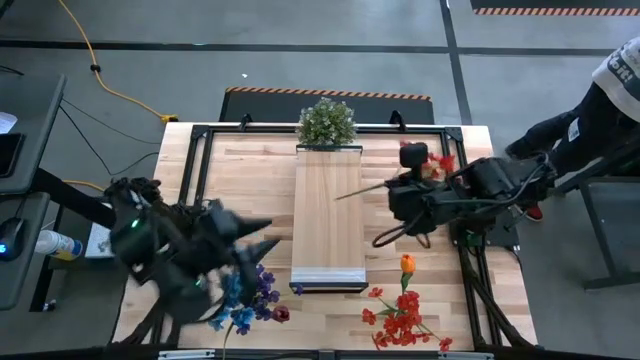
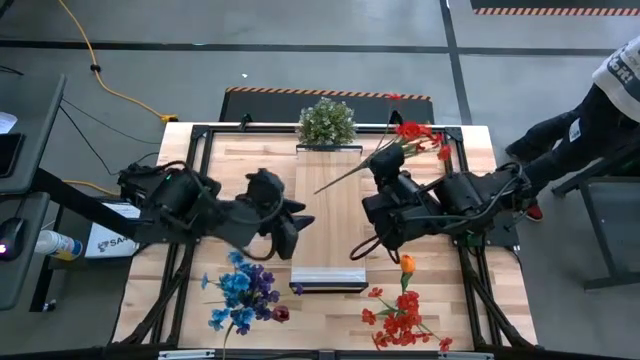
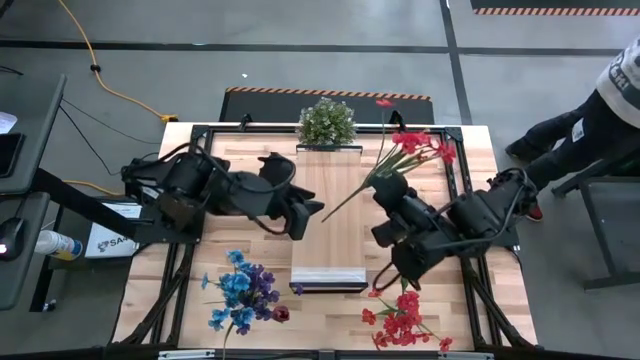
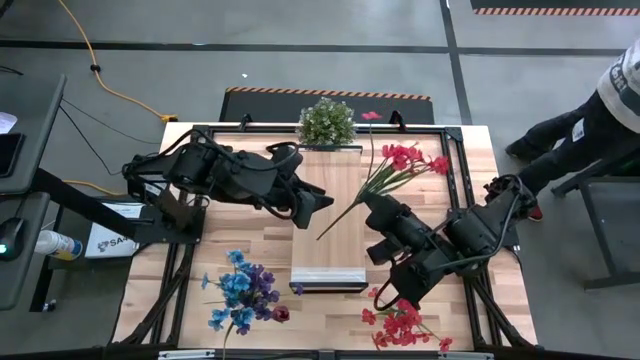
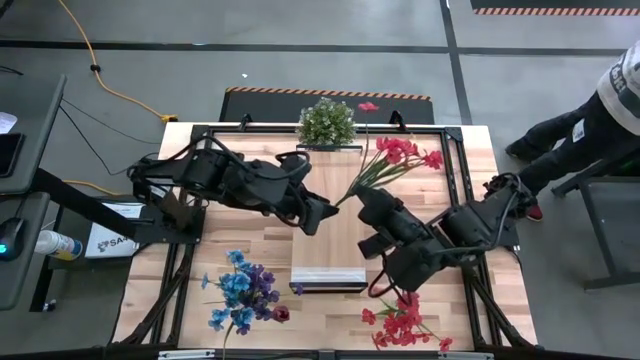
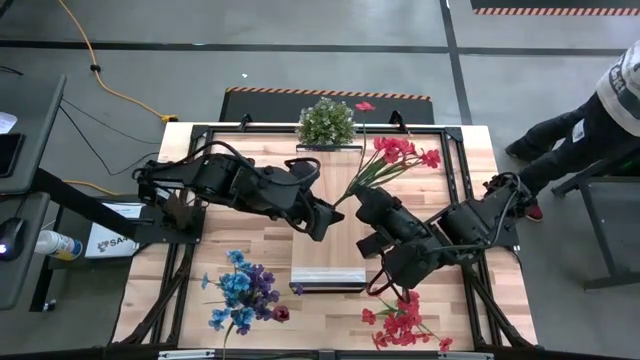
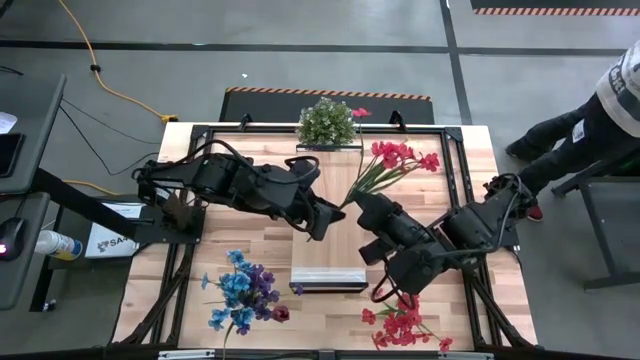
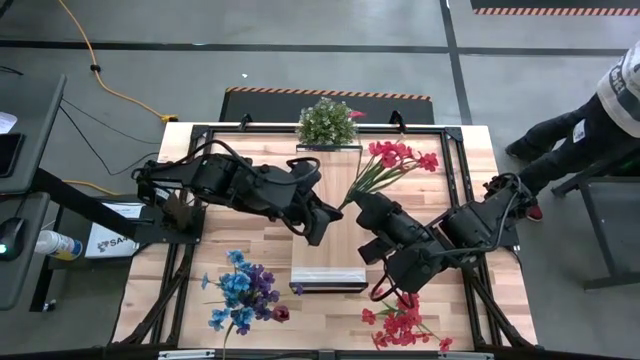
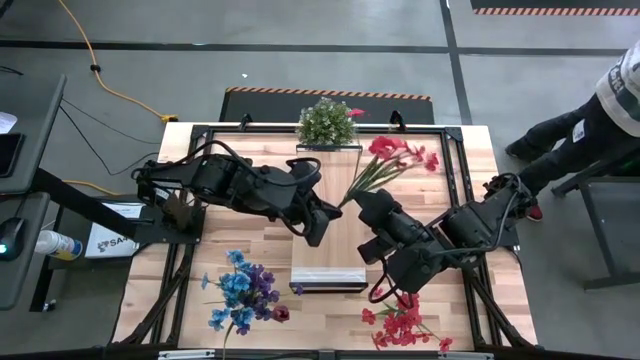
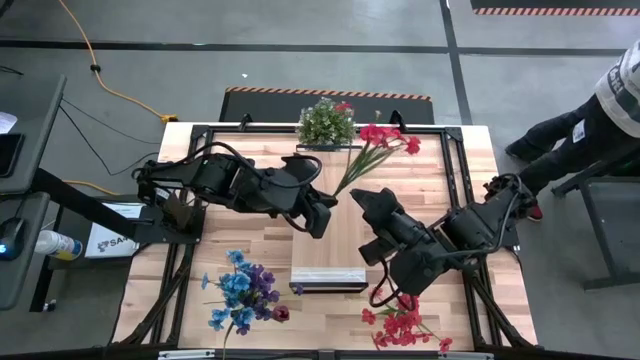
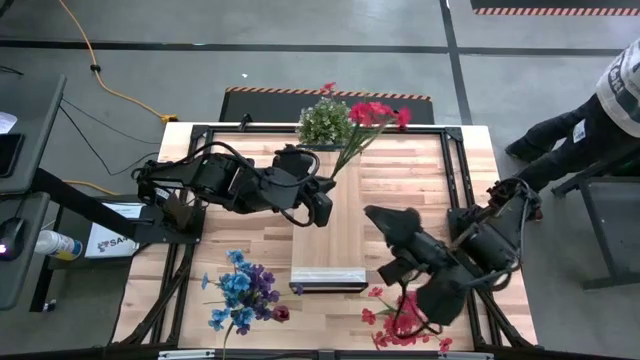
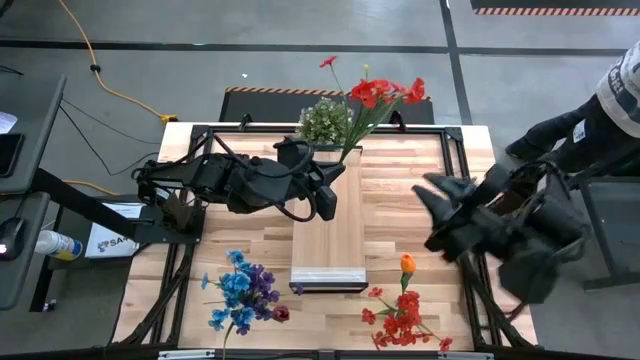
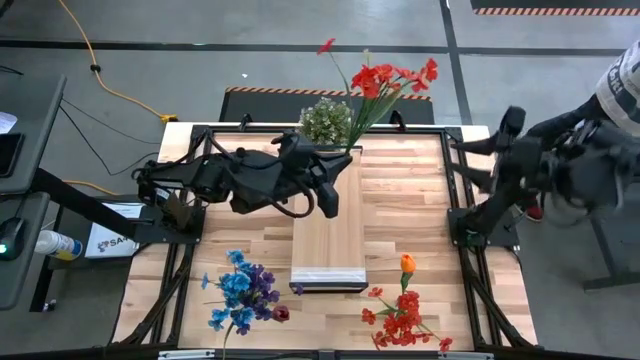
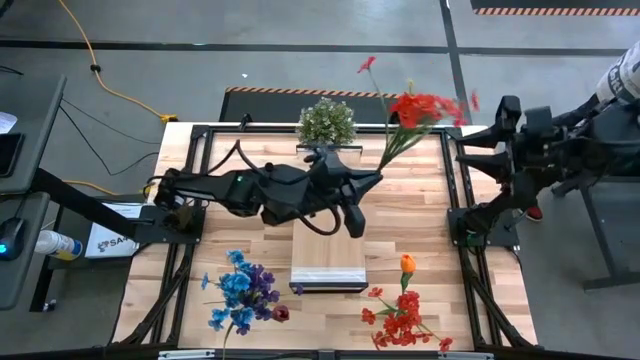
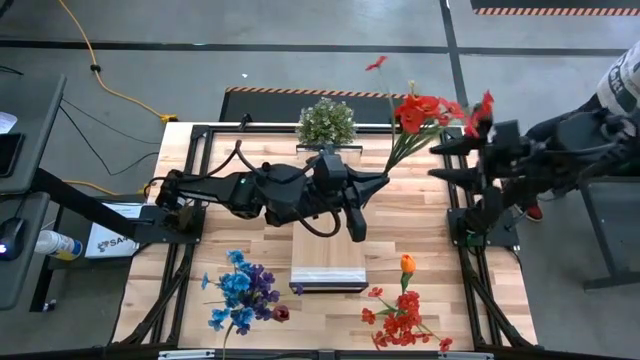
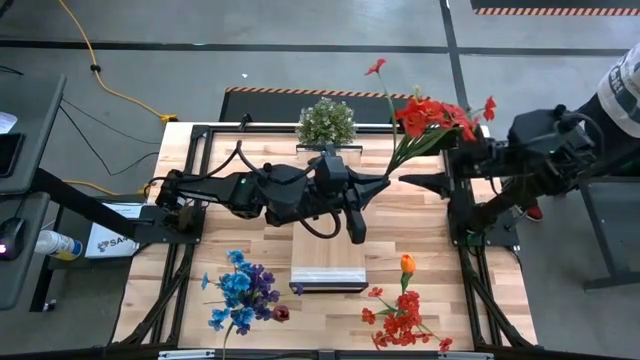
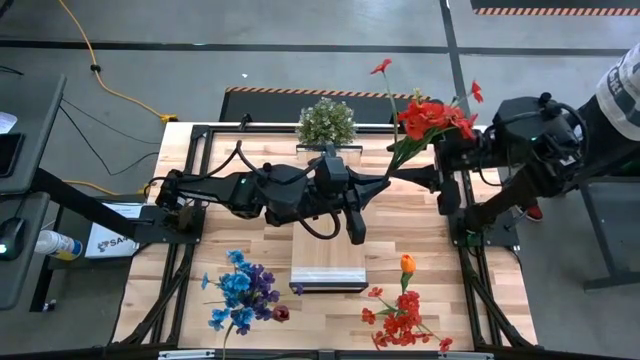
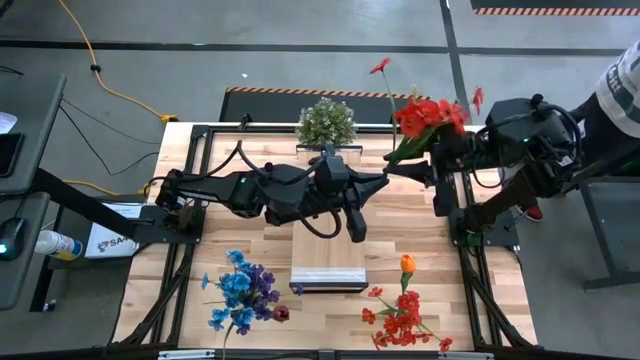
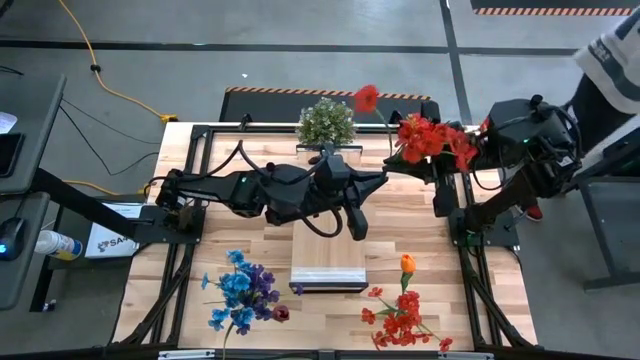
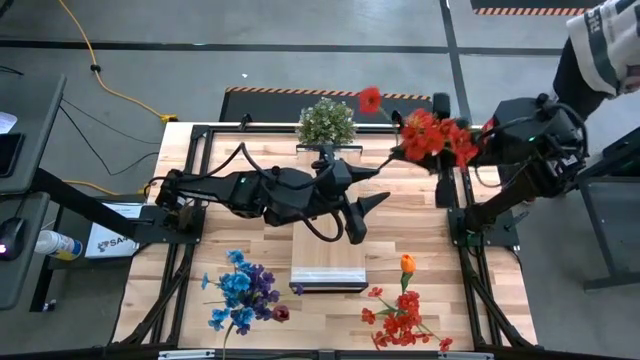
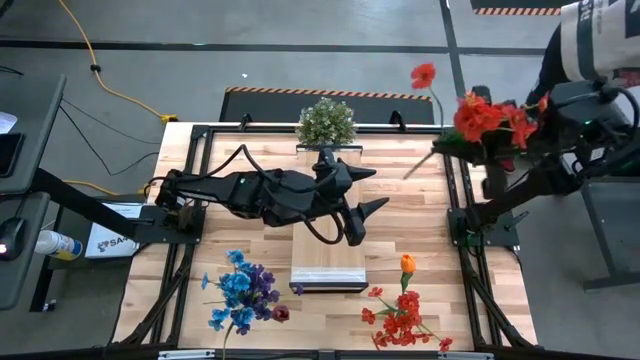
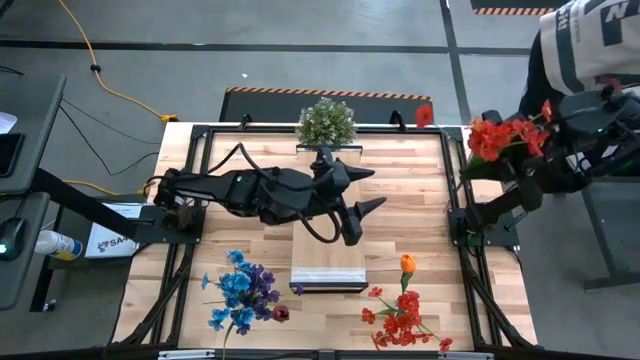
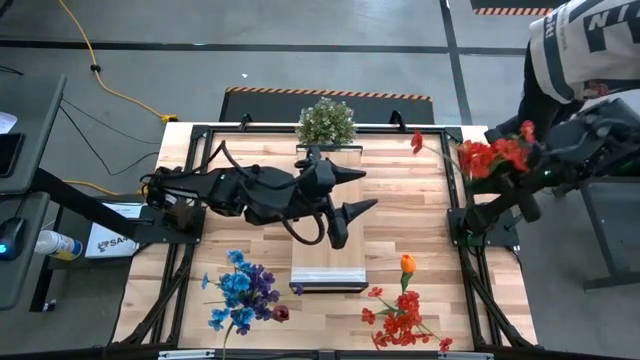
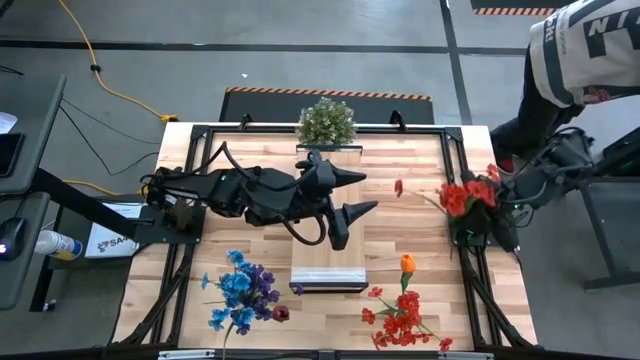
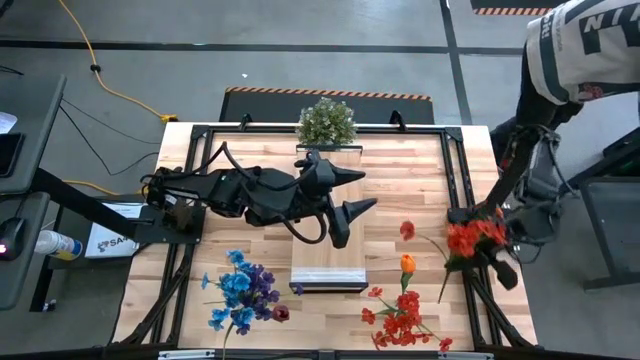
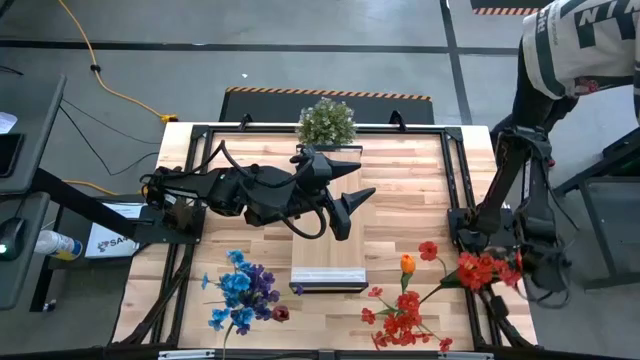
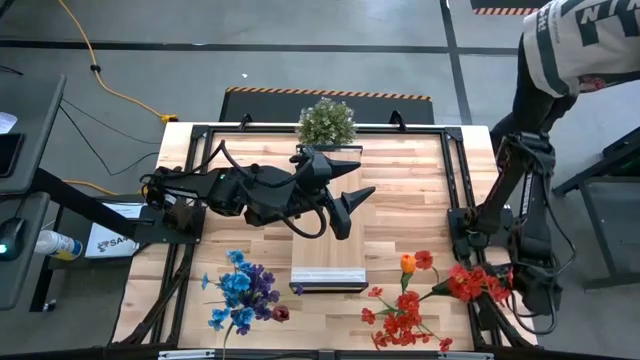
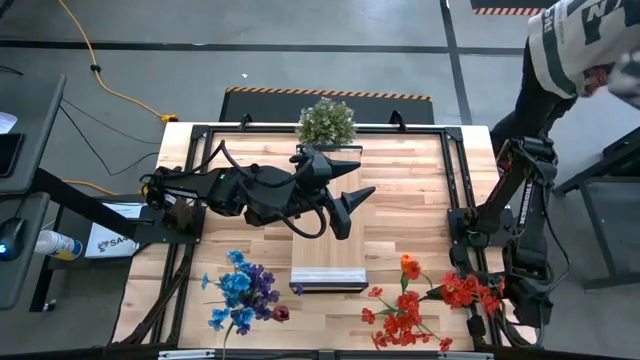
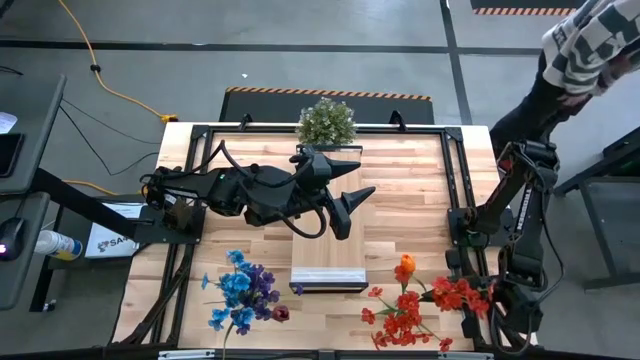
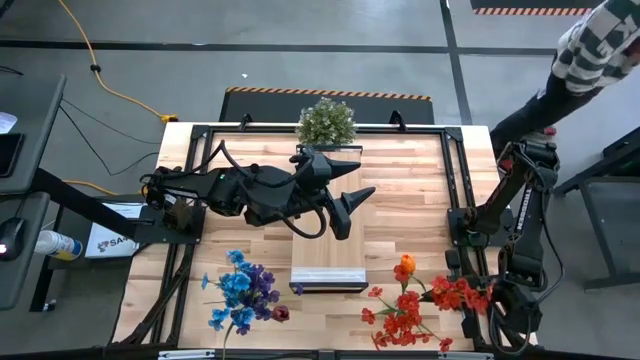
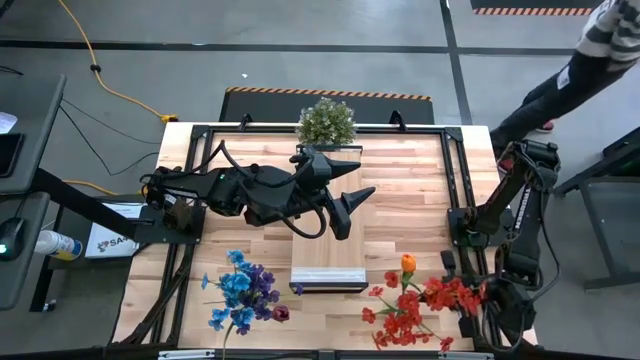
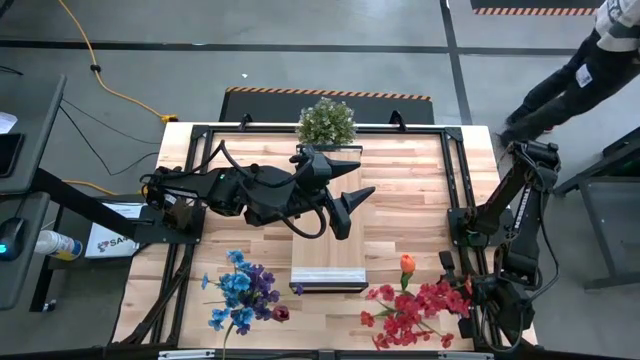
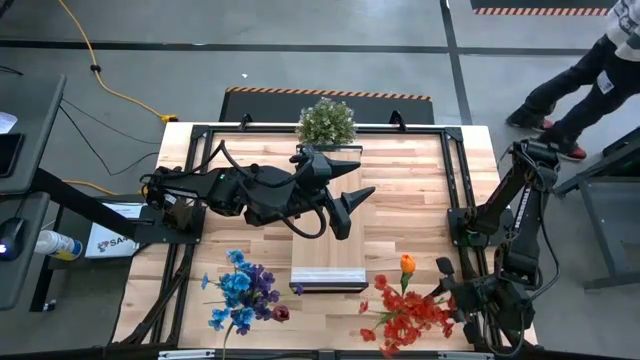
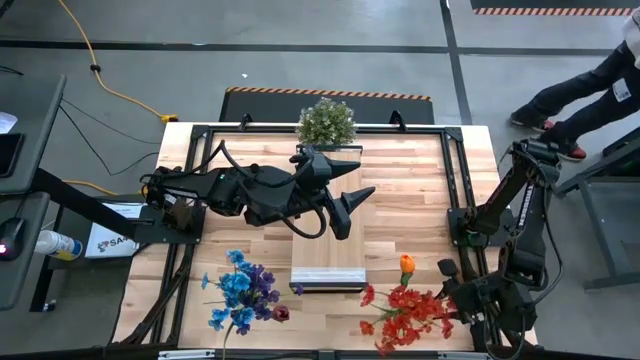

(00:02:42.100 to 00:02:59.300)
Task: Pick and place flowers into a vace then onto a shelf
Put the red flowers into the right transparent vase

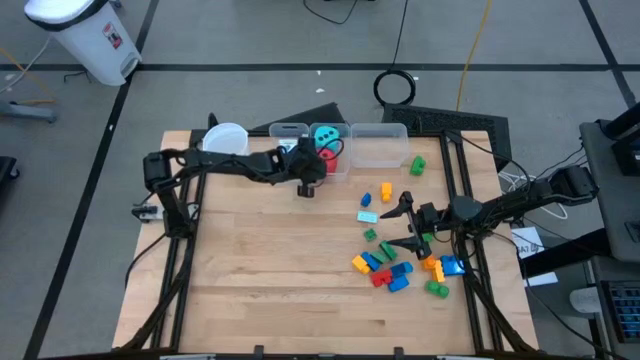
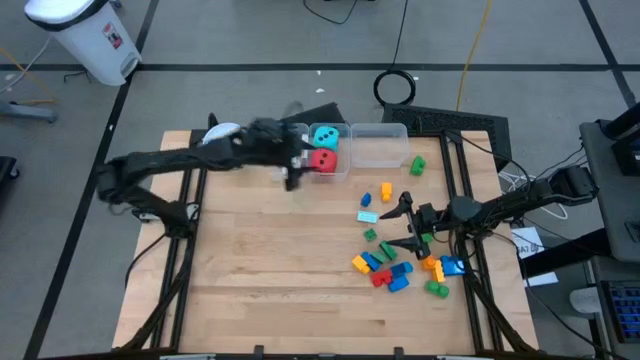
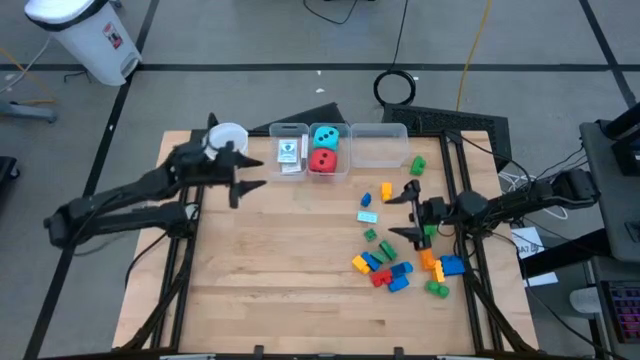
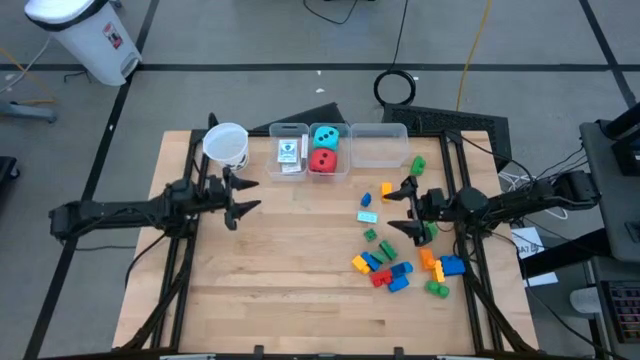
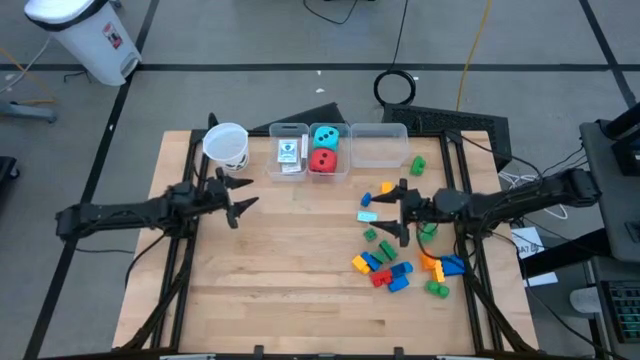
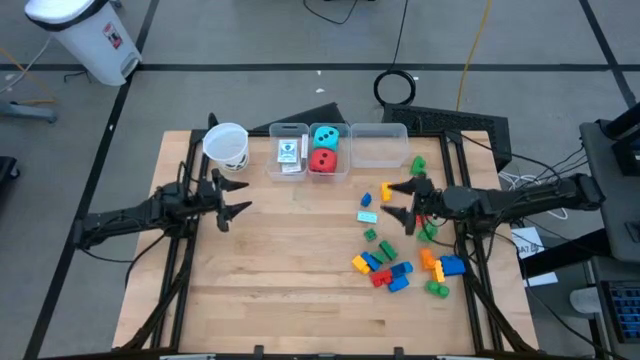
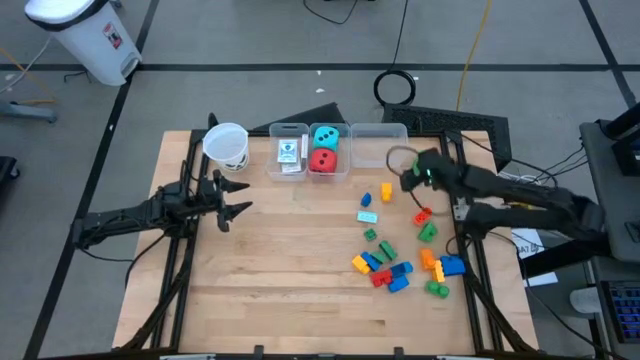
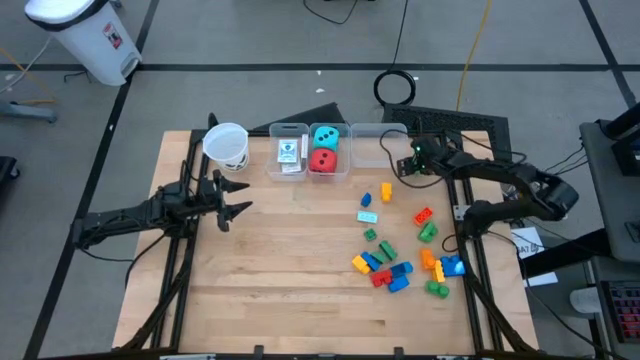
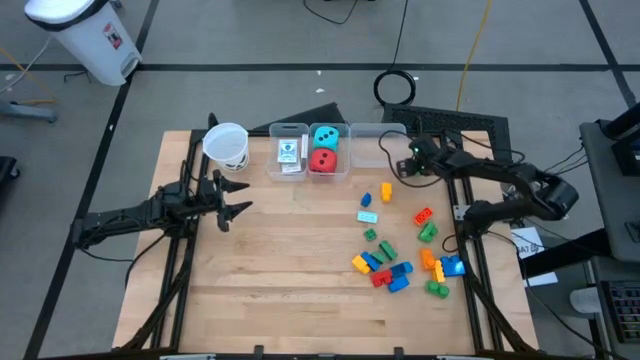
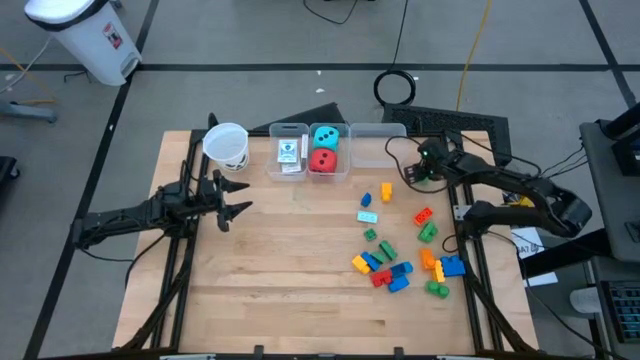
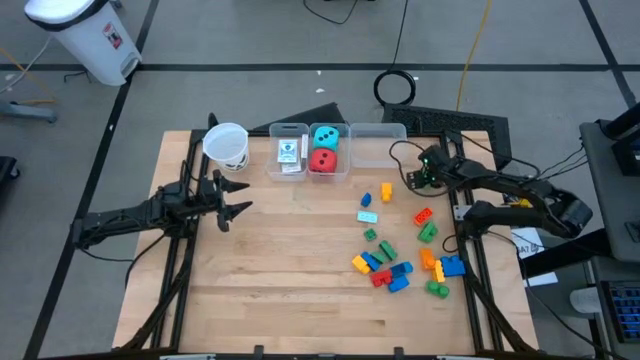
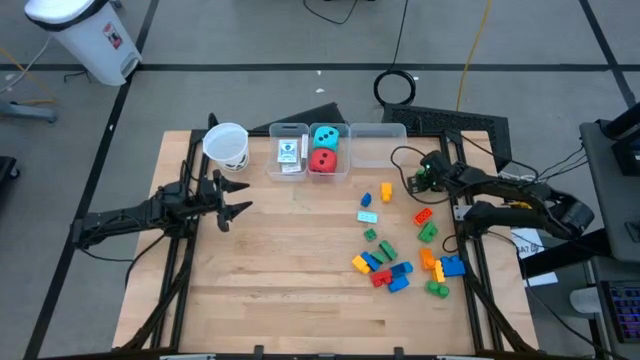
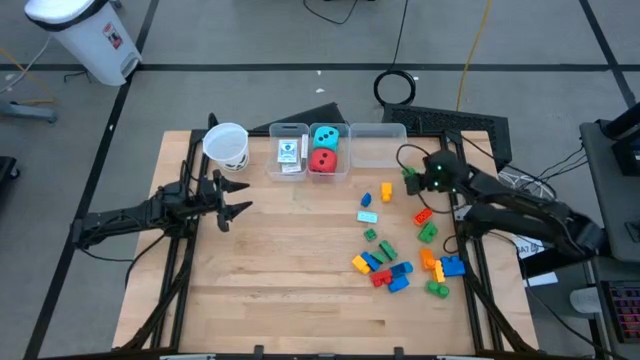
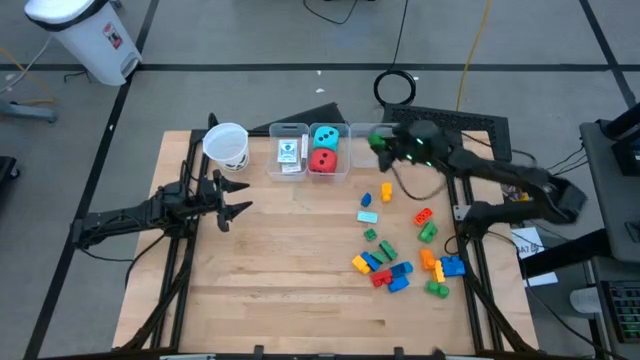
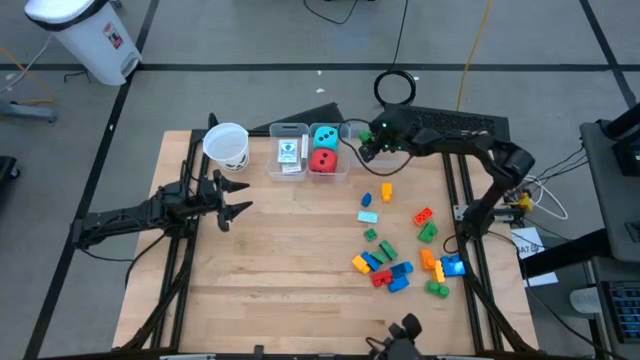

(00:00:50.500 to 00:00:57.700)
Task: Pick & Place Toys
Put the green game piece into the right transparent bin
